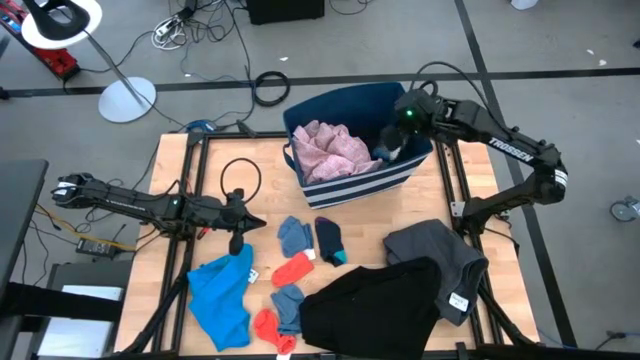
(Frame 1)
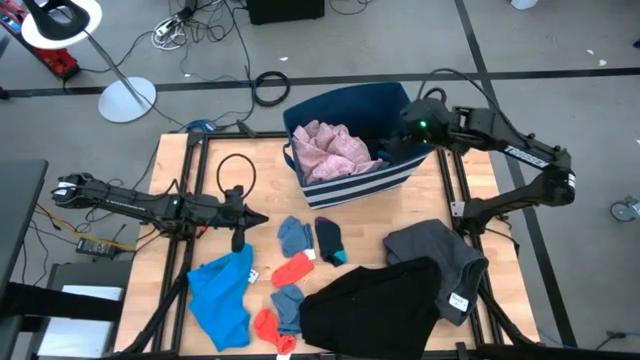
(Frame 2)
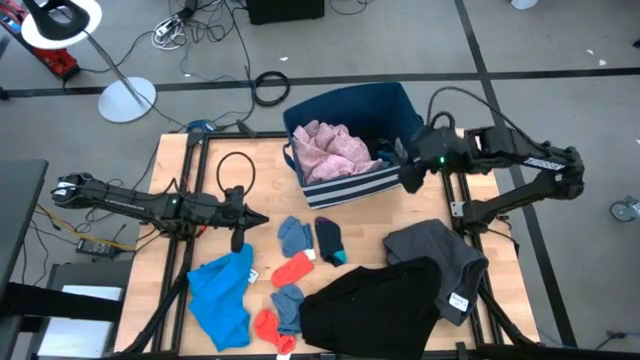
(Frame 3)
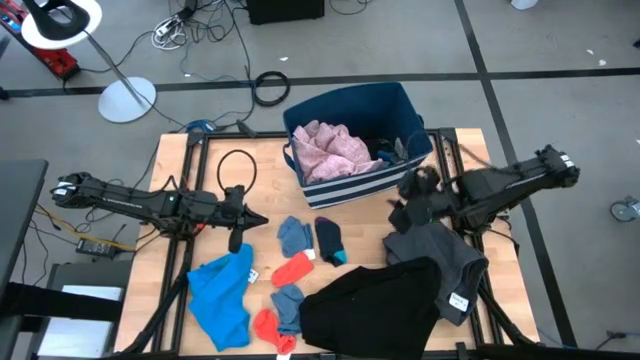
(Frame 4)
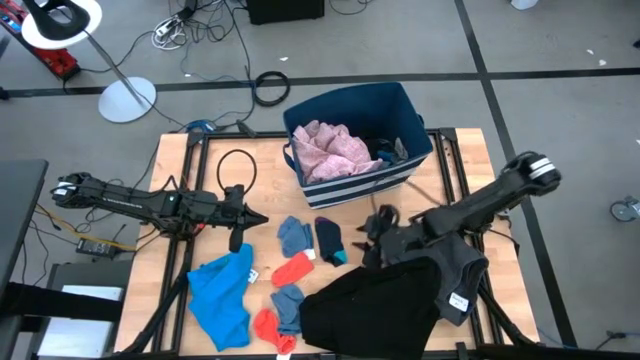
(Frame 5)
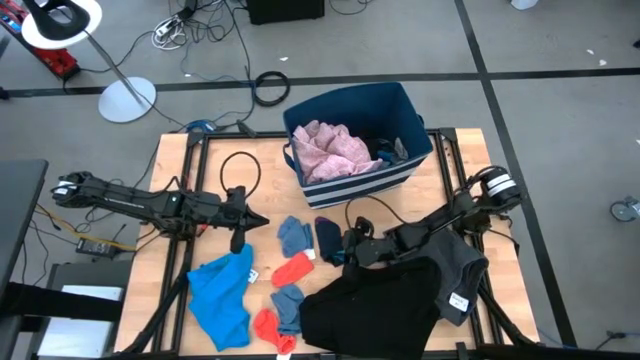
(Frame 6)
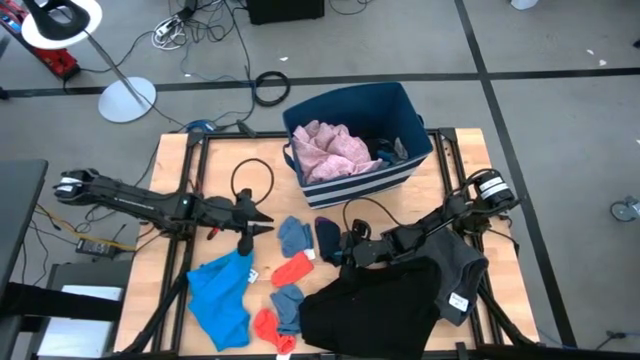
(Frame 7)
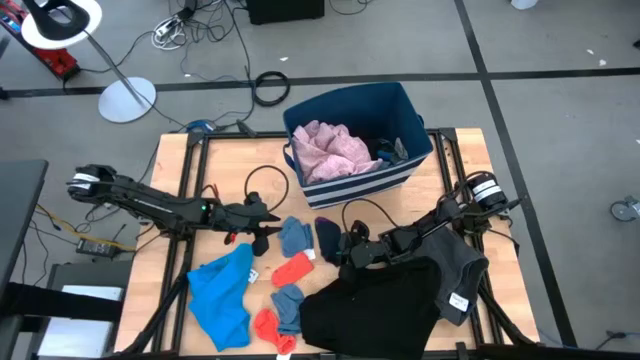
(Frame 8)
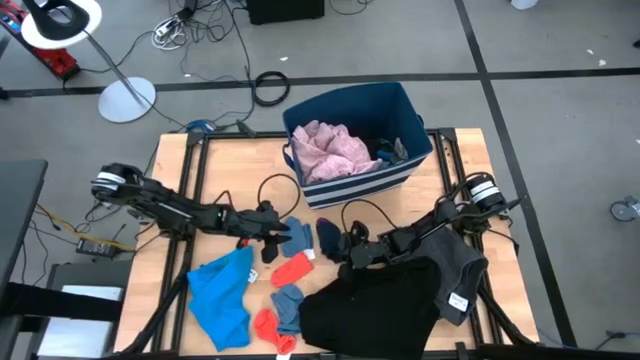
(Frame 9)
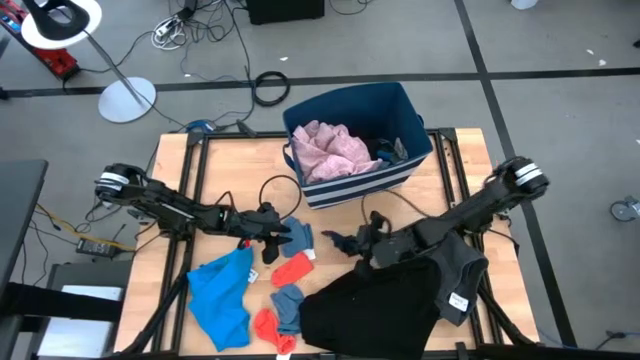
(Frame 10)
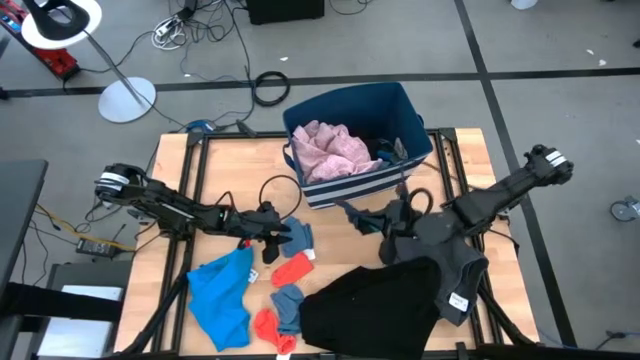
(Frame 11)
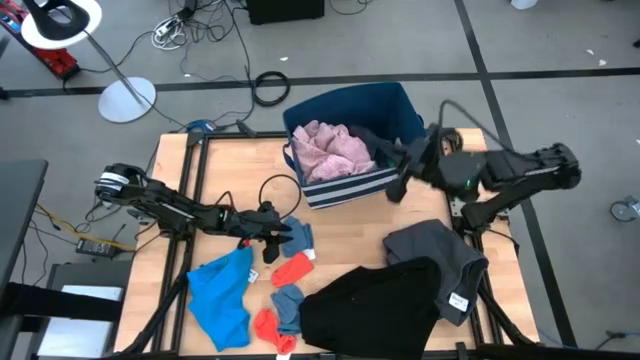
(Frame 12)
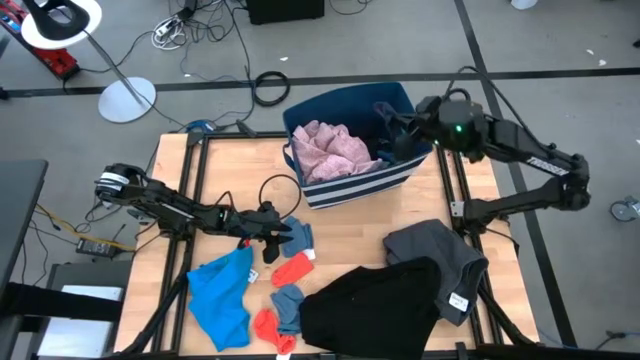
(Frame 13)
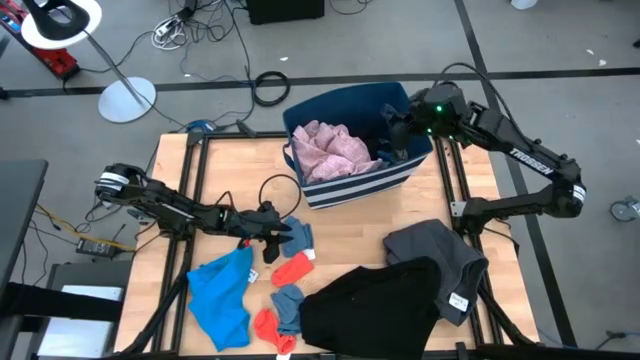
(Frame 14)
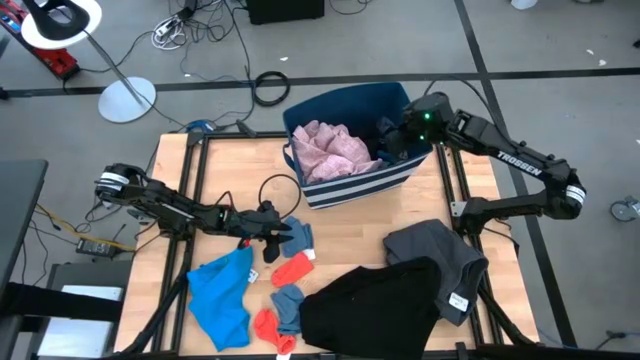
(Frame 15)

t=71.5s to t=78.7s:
Task: Sort clothes
Put the blue sock in the blue laundry bin organizer

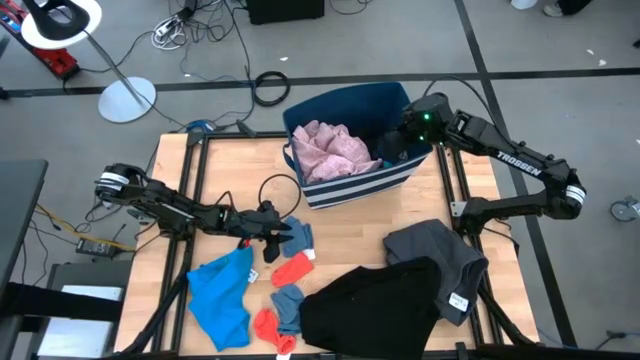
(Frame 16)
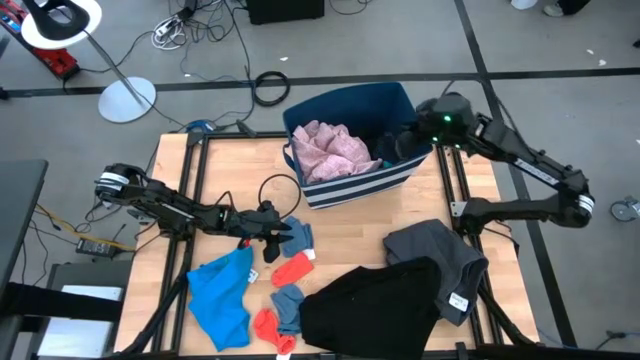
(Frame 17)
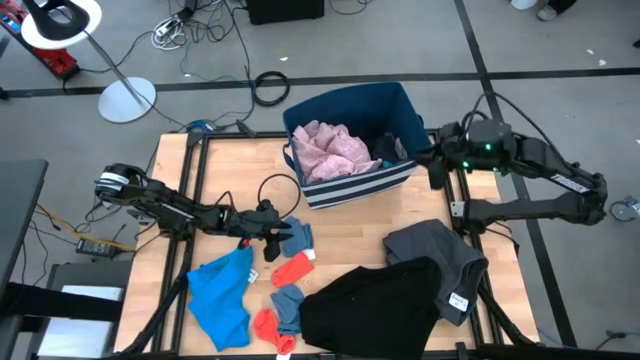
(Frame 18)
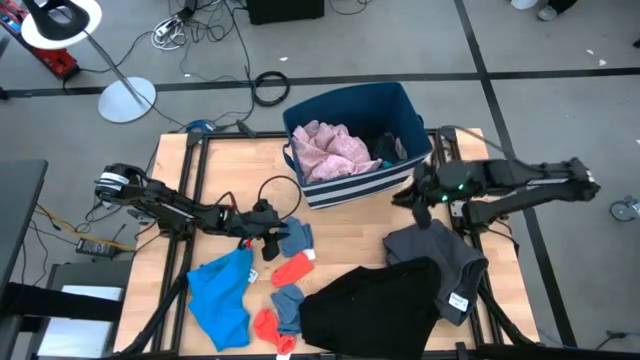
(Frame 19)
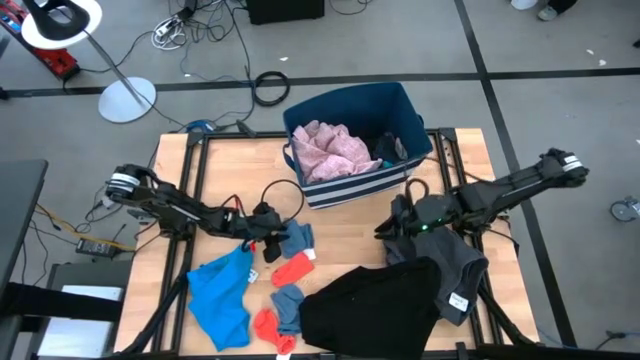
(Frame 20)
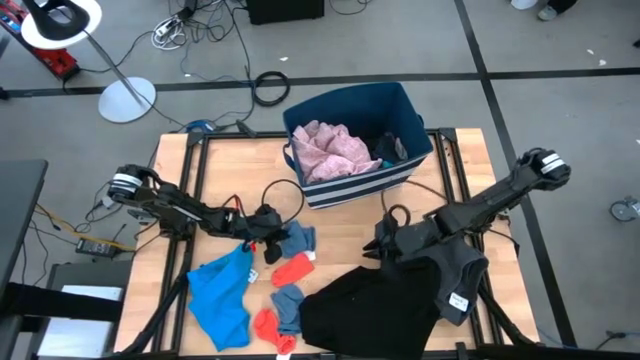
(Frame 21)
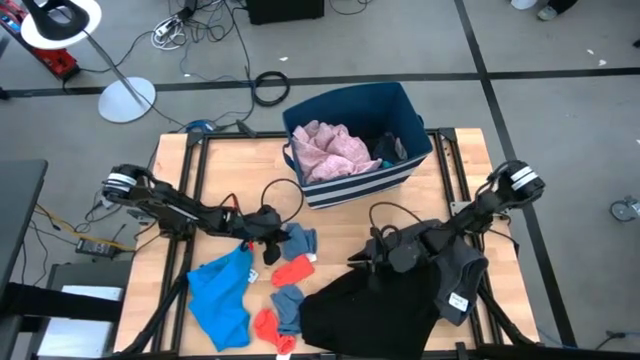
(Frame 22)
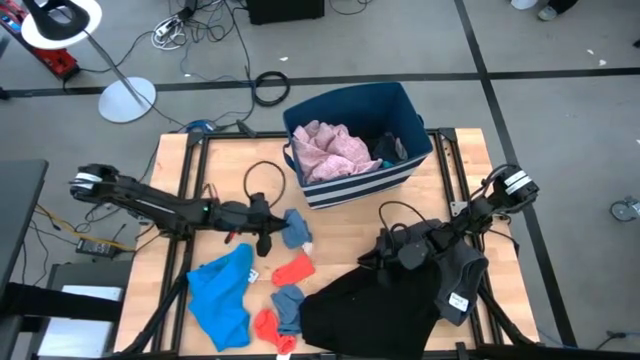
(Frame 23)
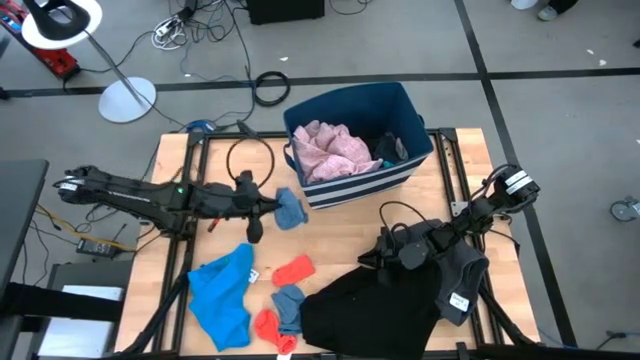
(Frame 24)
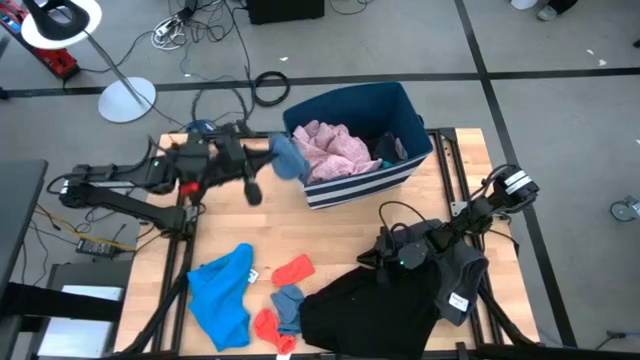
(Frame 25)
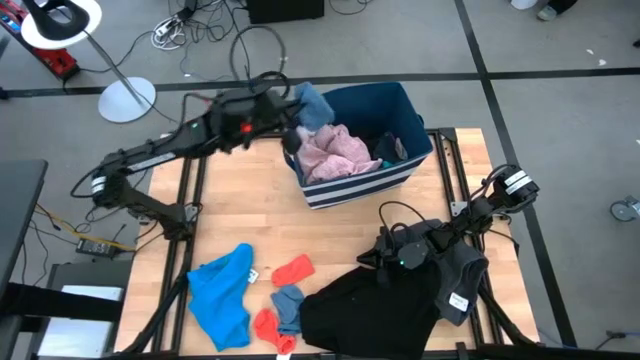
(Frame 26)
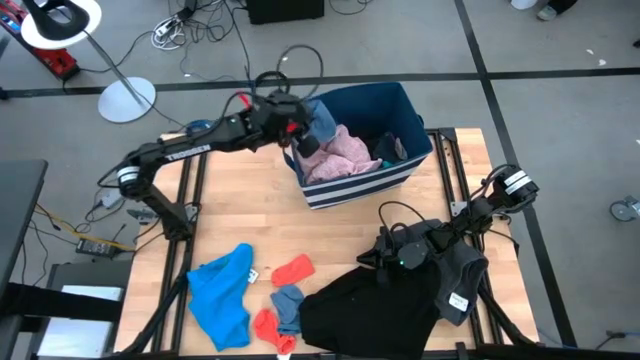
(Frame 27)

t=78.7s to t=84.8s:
Put the top gray sock in the blue laundry bin organizer

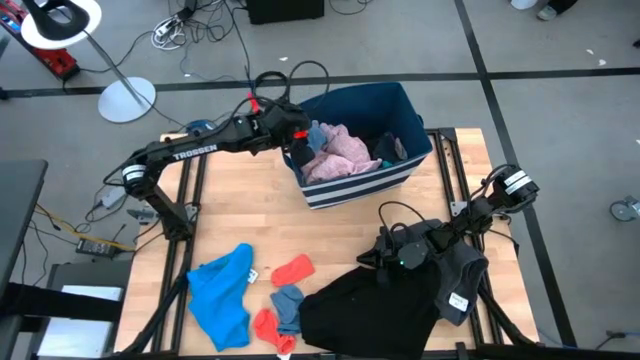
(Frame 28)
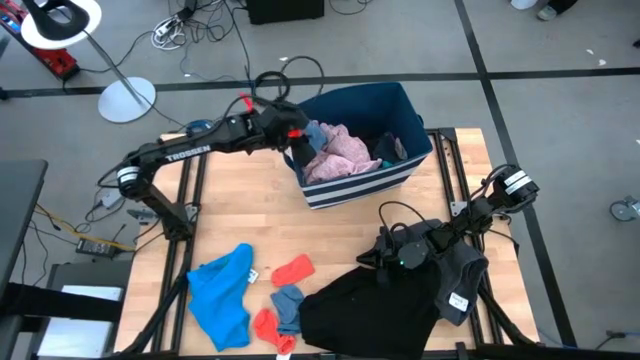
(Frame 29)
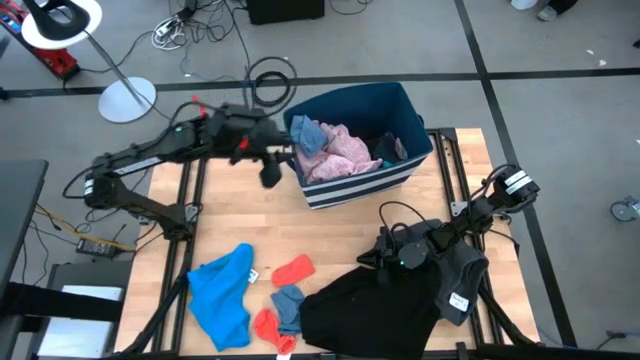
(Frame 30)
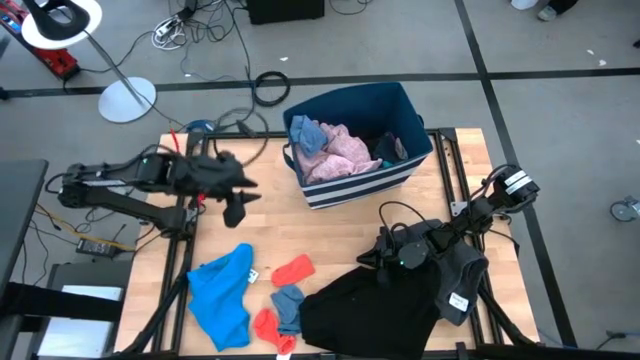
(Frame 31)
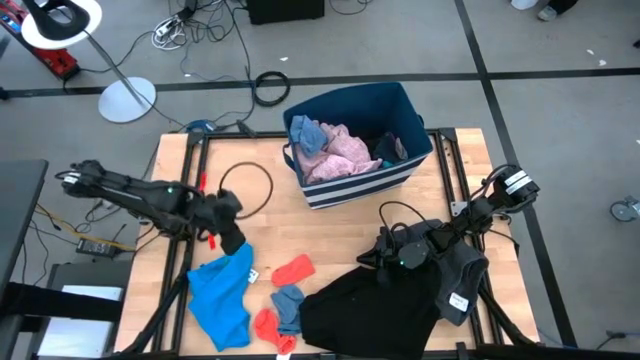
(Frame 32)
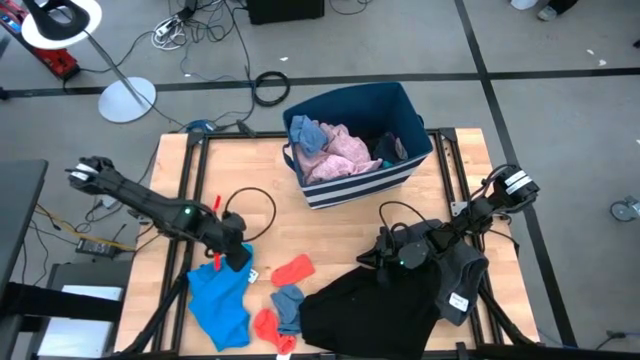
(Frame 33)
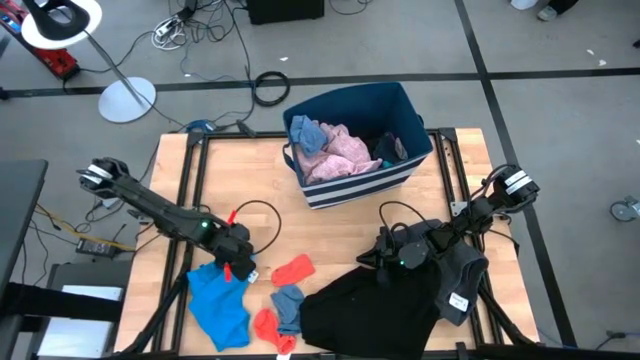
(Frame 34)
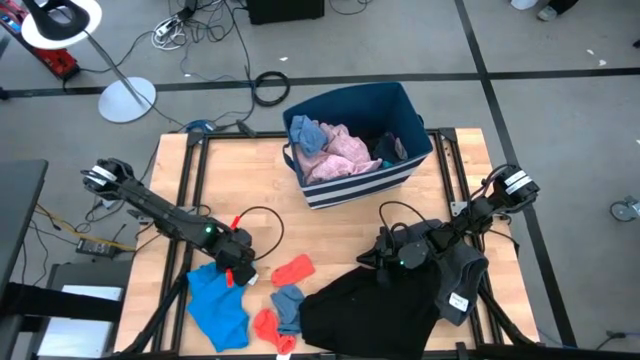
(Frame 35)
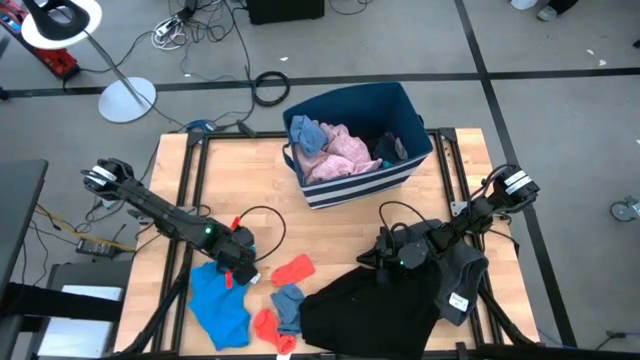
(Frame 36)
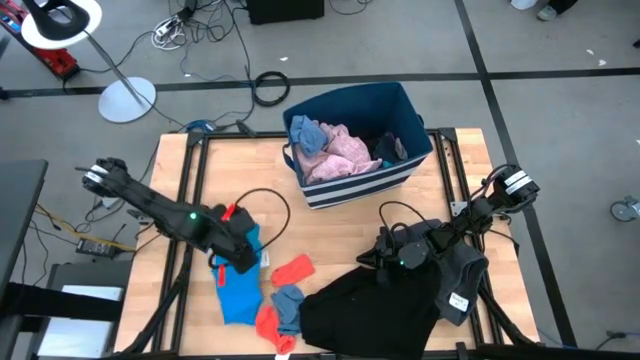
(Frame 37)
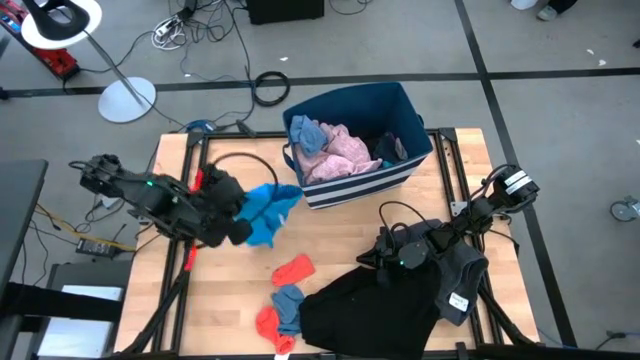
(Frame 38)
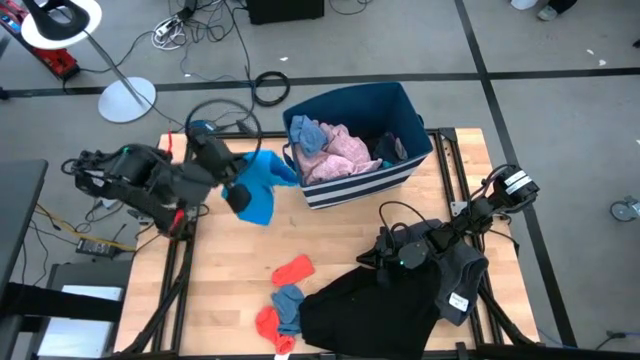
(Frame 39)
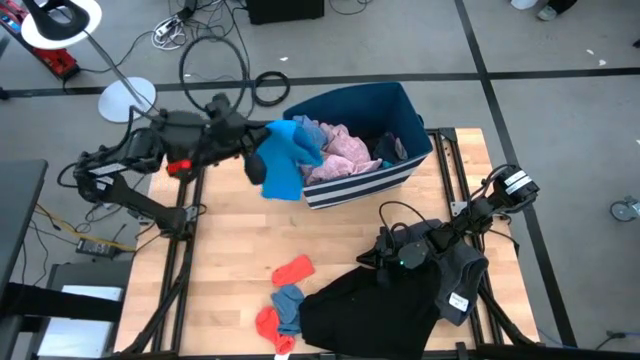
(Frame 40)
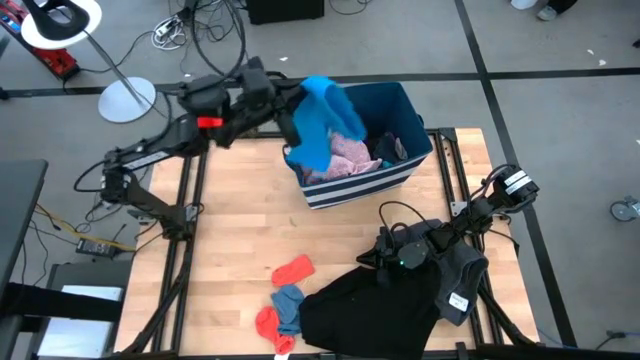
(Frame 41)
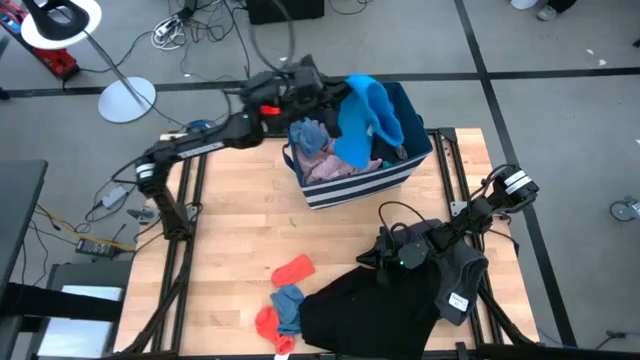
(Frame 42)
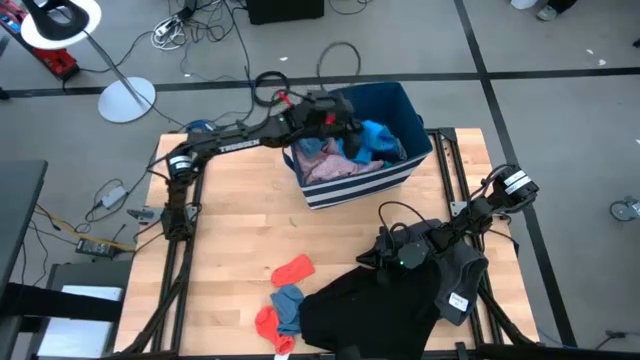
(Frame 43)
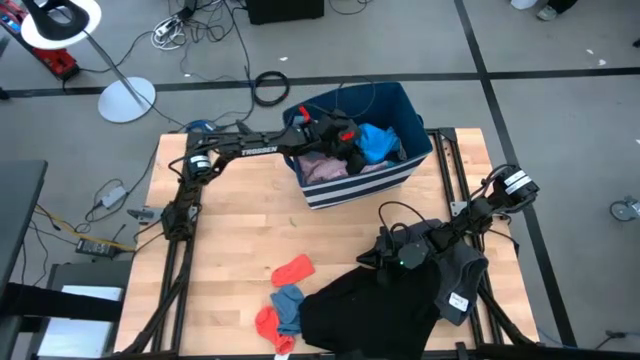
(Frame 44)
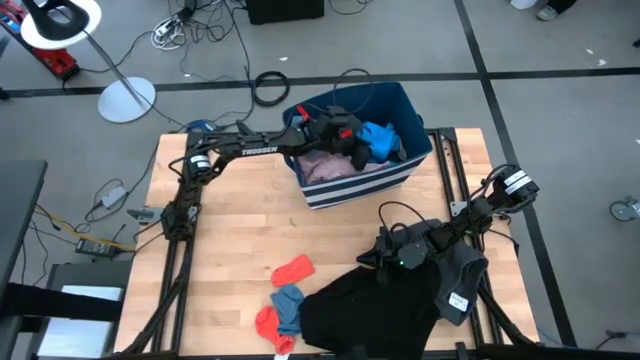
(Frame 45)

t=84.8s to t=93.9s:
Put the blue shorts in the blue laundry bin organizer
